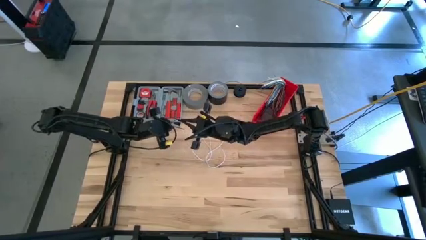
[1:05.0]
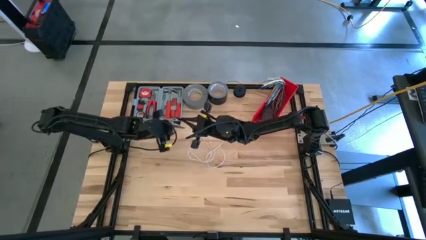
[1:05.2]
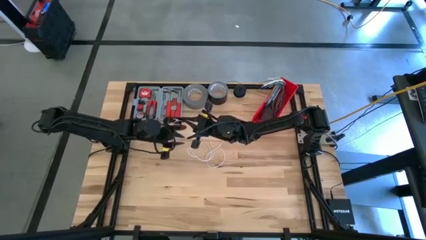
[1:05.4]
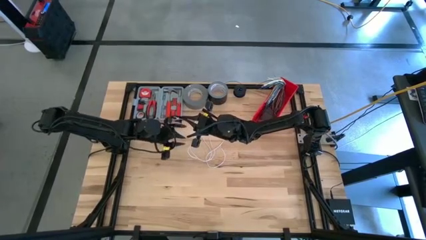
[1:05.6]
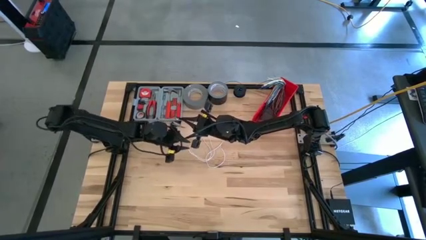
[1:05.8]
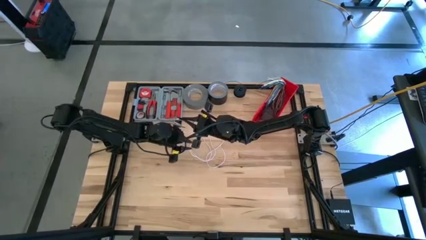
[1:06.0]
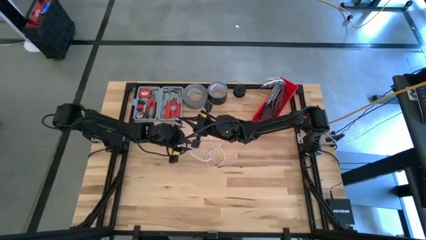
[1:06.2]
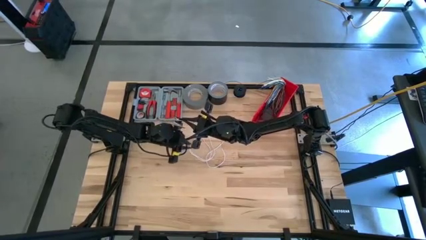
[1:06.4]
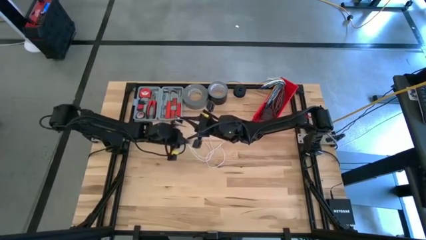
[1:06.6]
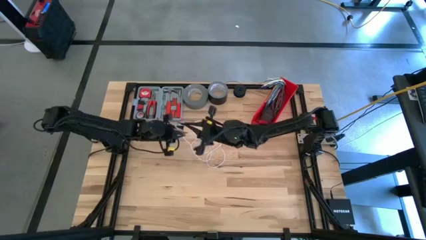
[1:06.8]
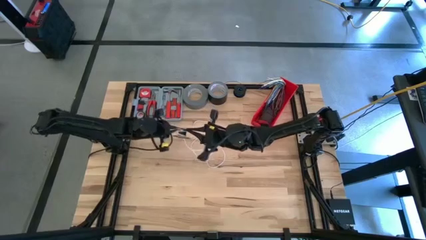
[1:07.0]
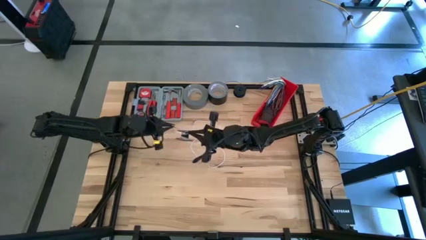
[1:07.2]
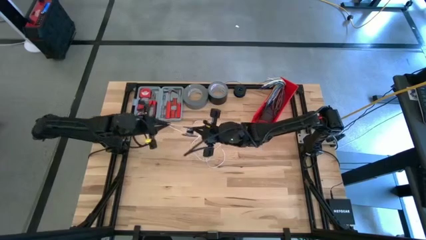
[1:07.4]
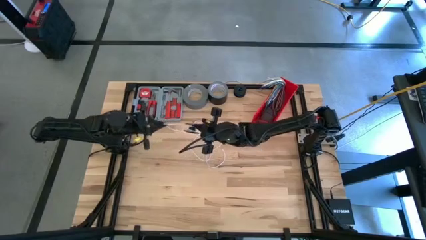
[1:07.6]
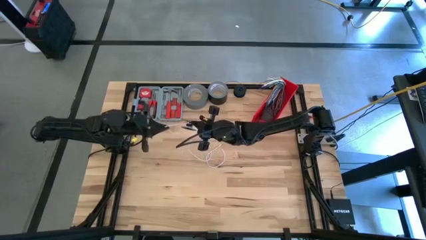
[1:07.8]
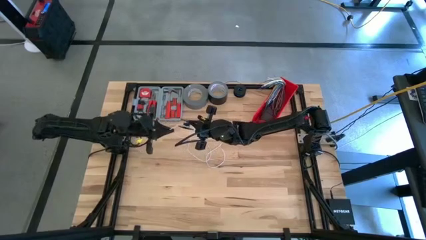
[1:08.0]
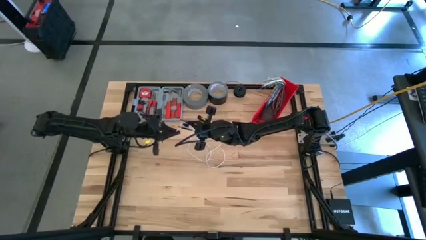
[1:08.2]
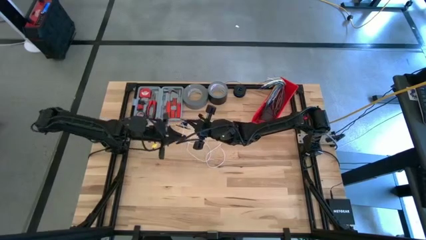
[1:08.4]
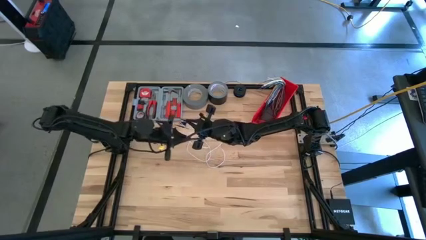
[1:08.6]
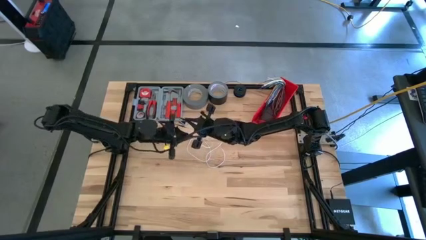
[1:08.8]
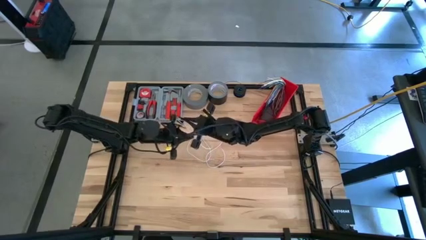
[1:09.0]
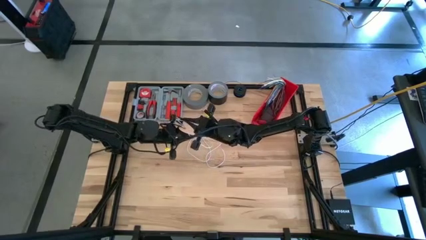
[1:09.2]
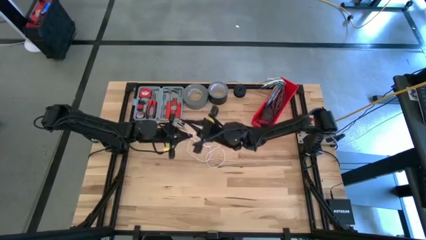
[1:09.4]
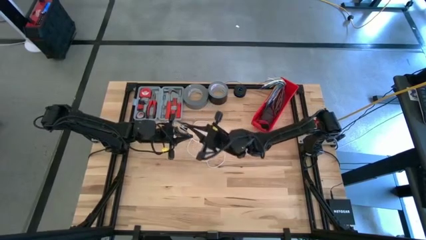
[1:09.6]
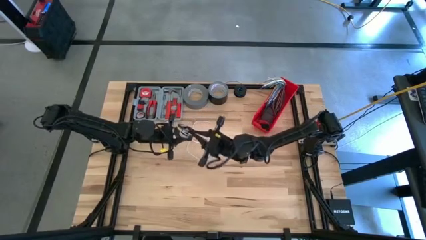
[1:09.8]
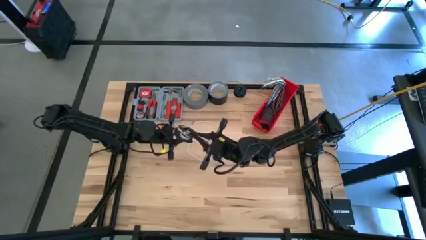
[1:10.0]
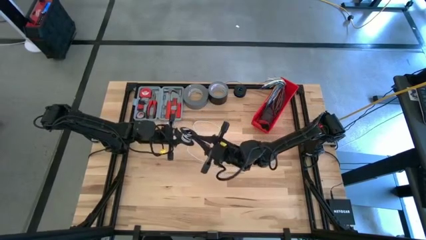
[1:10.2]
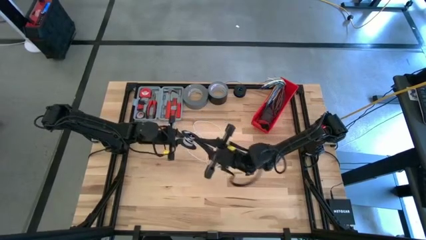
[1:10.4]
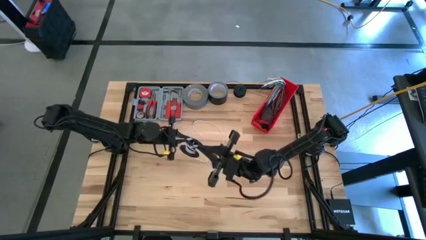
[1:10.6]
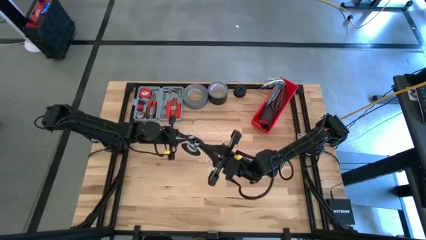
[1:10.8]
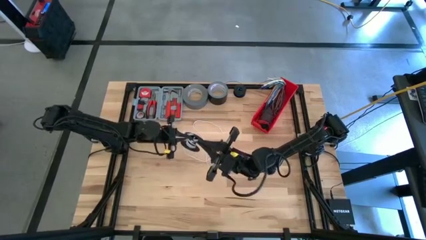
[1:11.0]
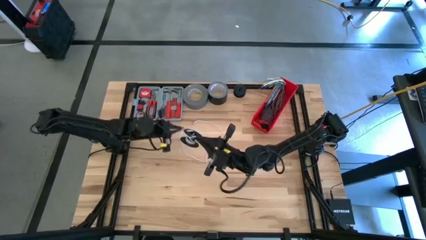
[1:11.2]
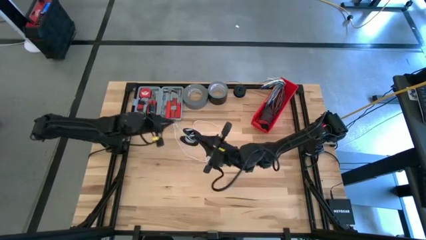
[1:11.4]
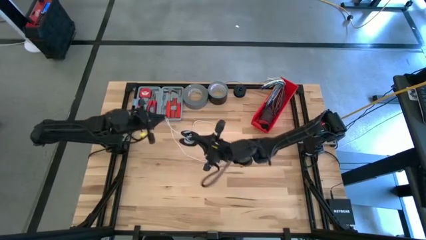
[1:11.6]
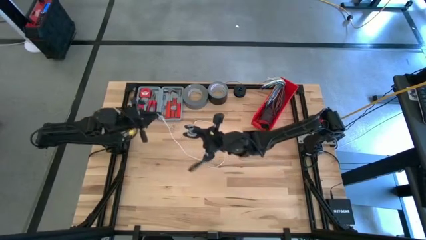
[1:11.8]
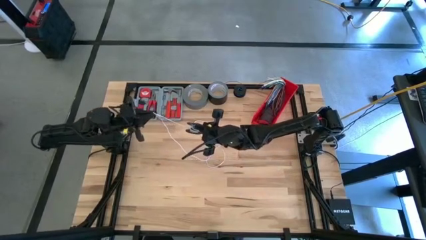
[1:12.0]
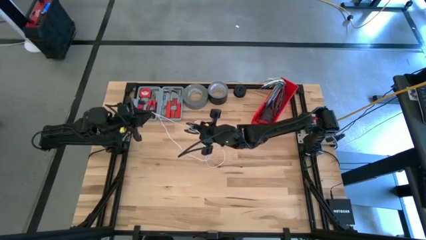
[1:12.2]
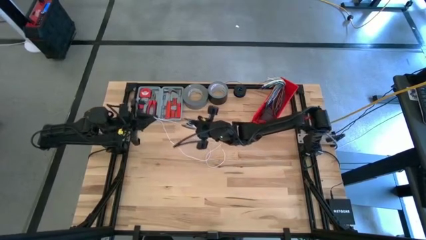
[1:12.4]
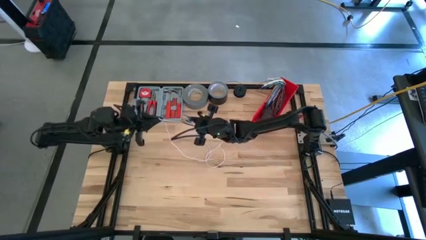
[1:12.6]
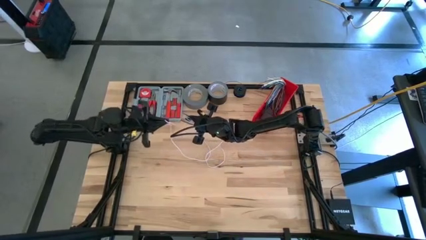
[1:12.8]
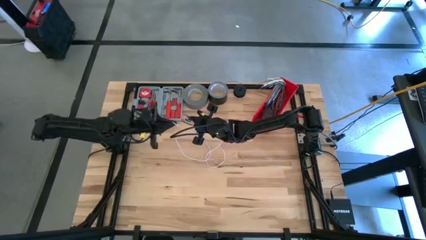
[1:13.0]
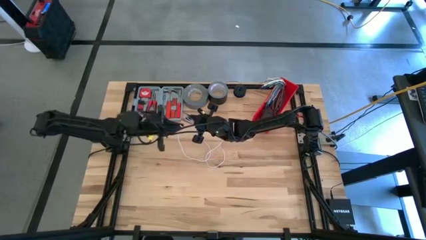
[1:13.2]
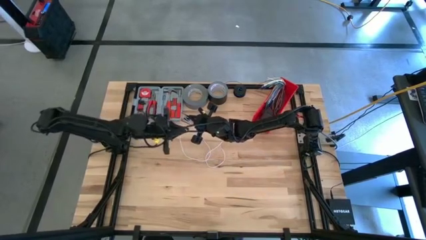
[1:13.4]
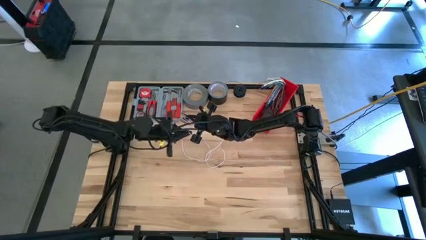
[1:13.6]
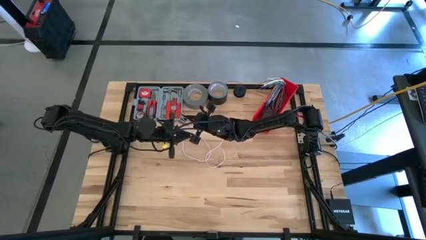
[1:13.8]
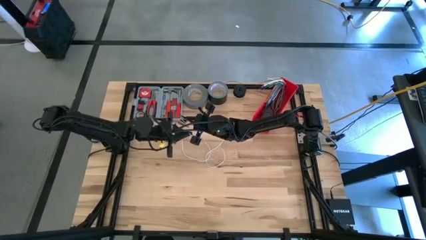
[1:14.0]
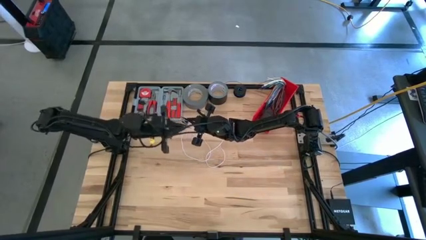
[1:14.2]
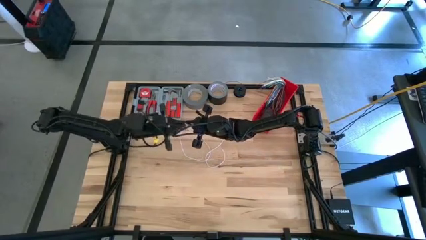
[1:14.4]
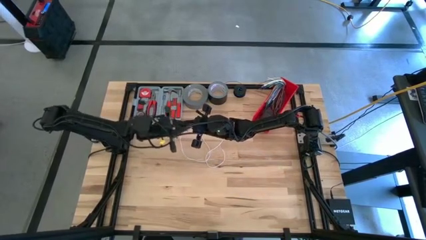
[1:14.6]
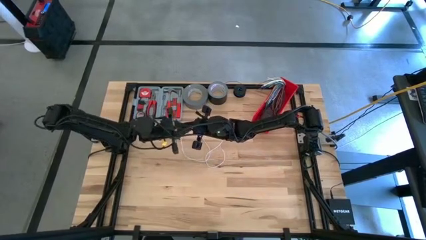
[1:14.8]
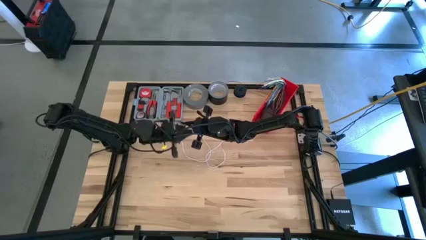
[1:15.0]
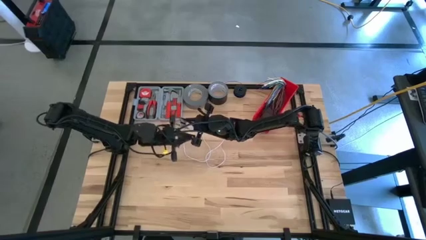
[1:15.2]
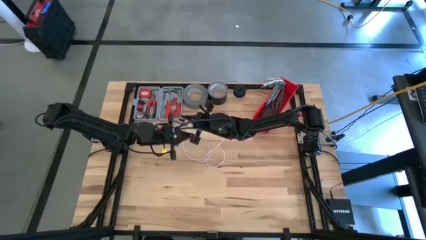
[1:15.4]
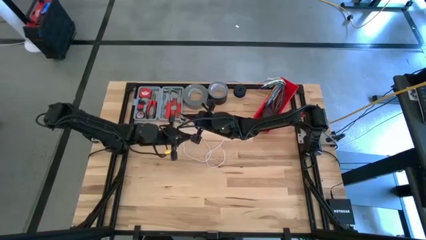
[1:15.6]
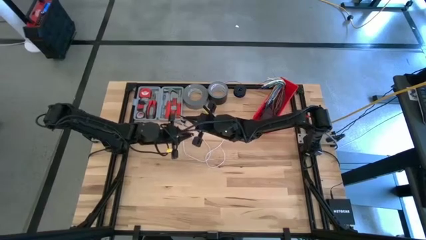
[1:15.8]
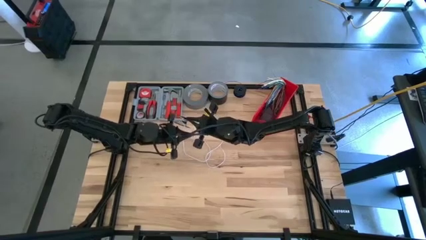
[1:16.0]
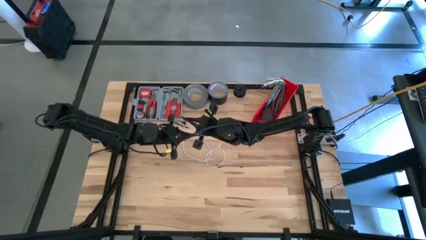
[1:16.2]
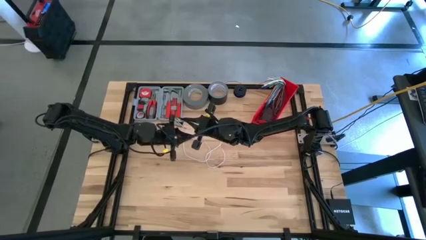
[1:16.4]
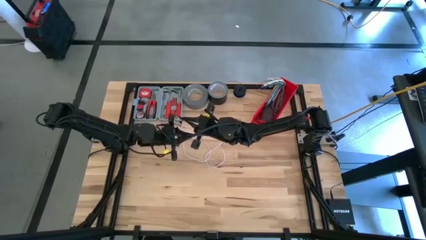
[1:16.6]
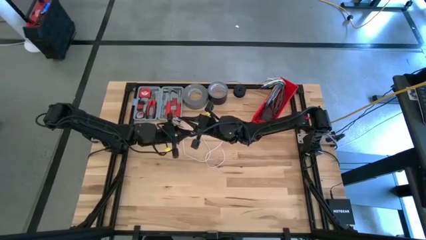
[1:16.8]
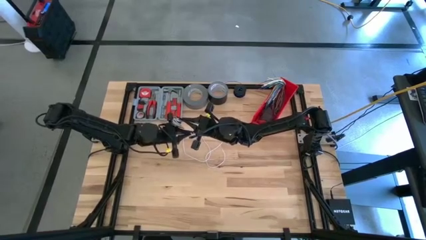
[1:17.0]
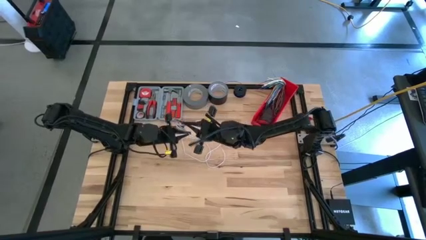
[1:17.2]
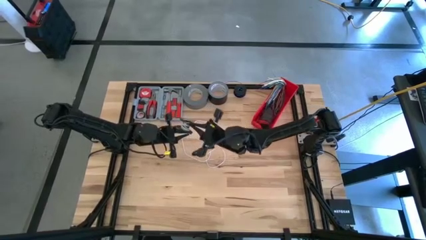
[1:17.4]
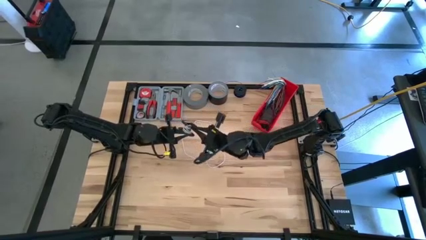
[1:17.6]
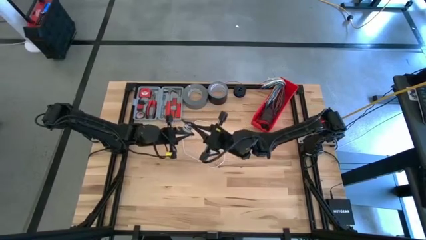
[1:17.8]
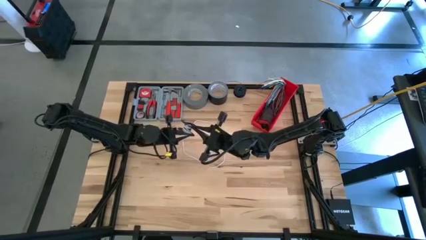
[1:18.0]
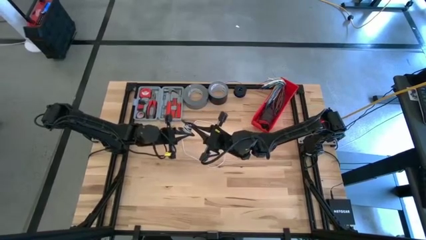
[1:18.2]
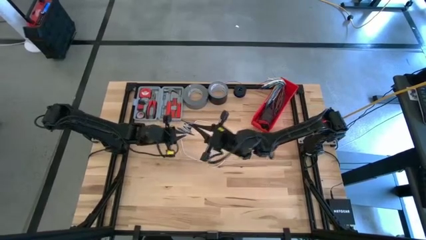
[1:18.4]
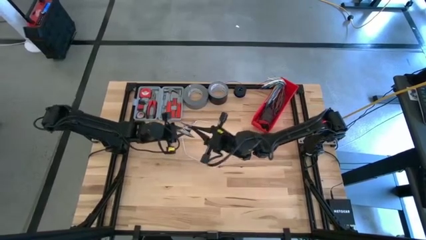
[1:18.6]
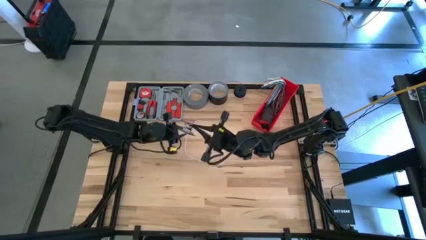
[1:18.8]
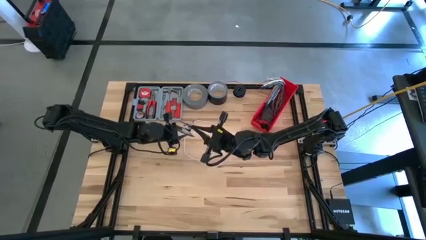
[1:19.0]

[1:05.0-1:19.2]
Task: Coil cords
Coil the white wire on the black spool
